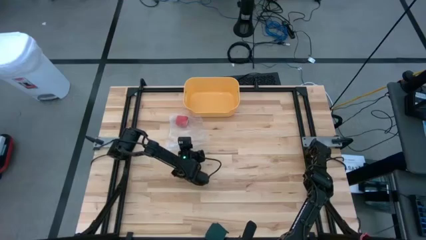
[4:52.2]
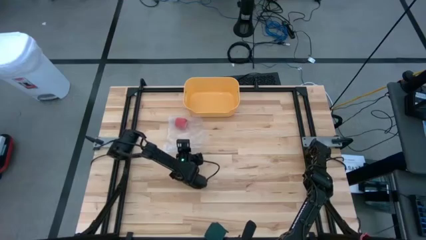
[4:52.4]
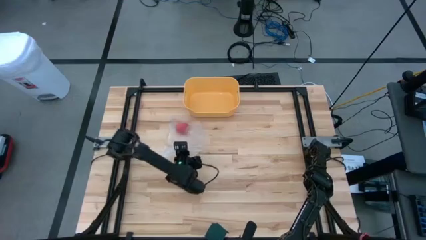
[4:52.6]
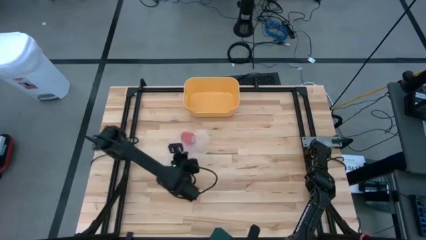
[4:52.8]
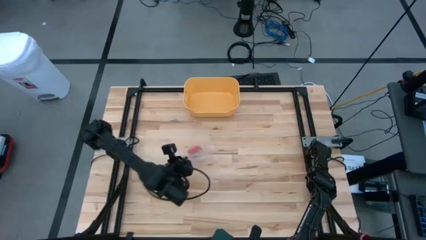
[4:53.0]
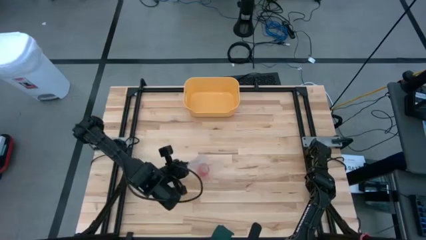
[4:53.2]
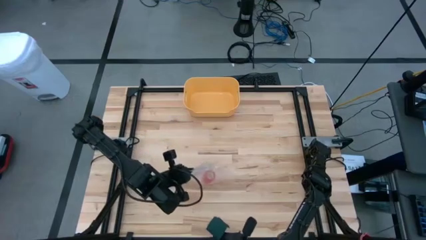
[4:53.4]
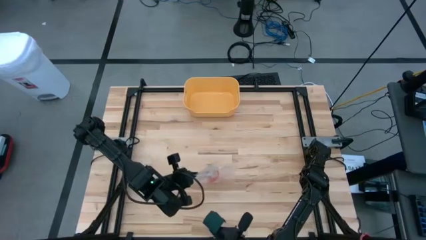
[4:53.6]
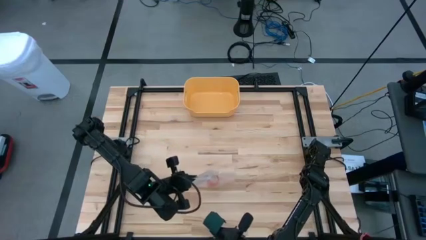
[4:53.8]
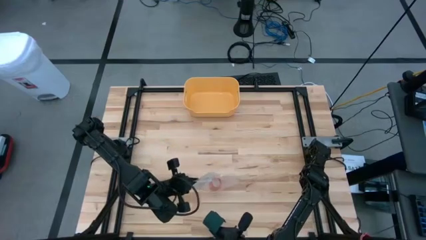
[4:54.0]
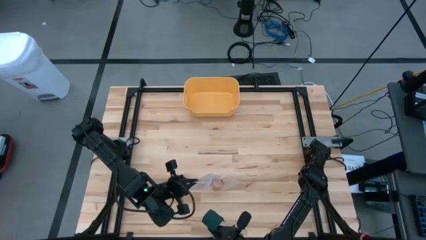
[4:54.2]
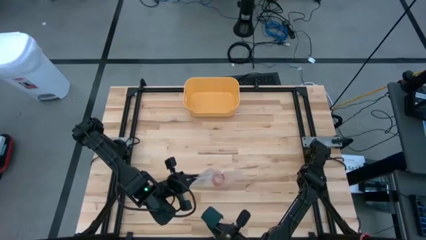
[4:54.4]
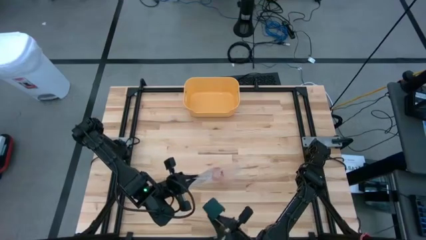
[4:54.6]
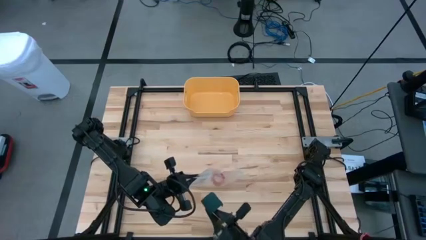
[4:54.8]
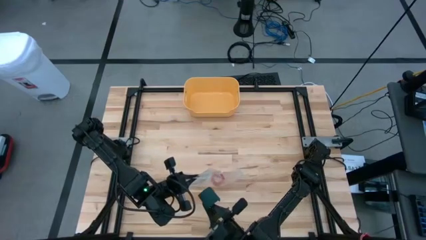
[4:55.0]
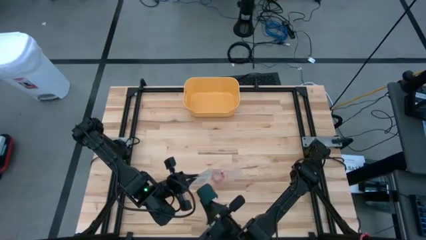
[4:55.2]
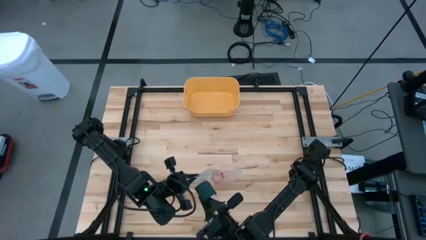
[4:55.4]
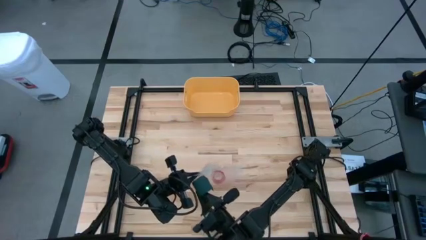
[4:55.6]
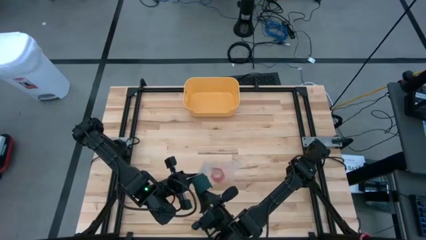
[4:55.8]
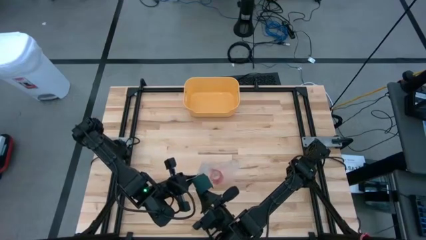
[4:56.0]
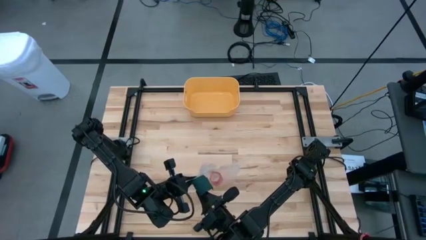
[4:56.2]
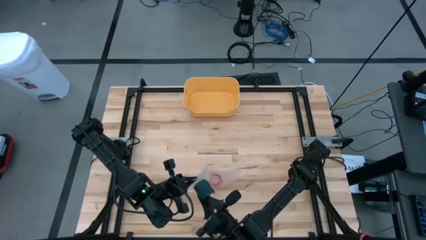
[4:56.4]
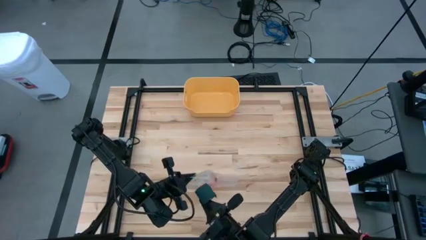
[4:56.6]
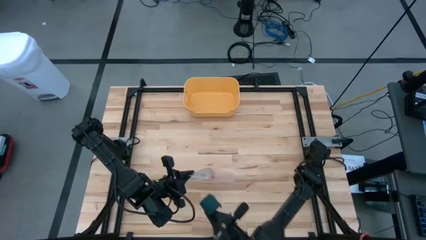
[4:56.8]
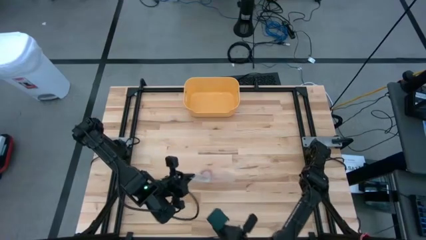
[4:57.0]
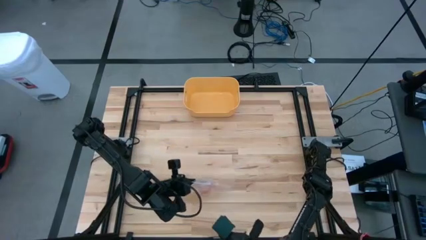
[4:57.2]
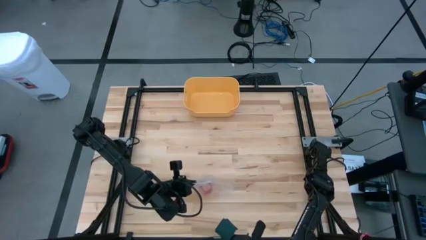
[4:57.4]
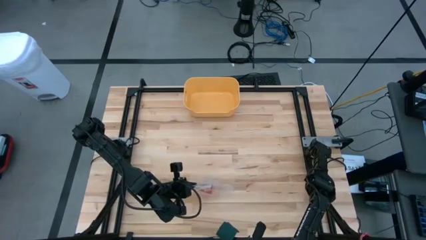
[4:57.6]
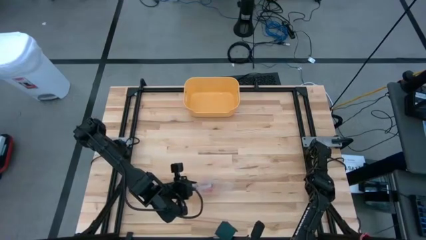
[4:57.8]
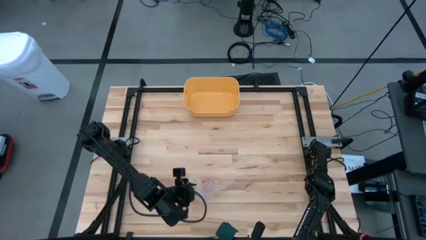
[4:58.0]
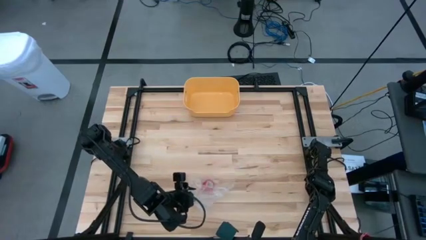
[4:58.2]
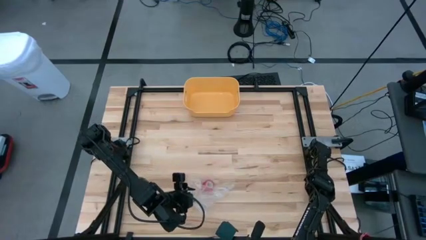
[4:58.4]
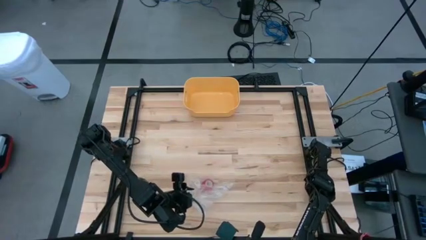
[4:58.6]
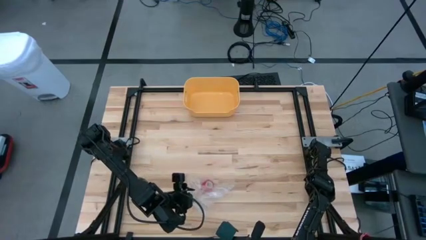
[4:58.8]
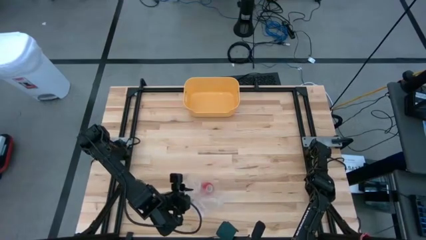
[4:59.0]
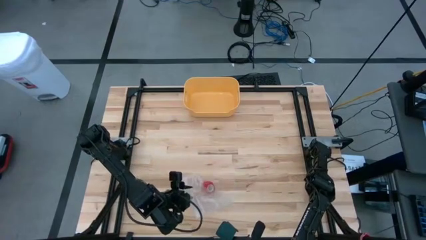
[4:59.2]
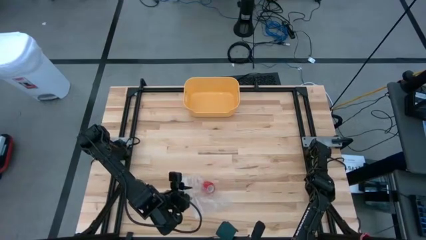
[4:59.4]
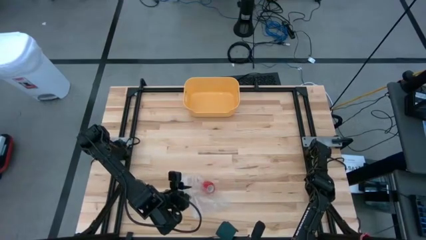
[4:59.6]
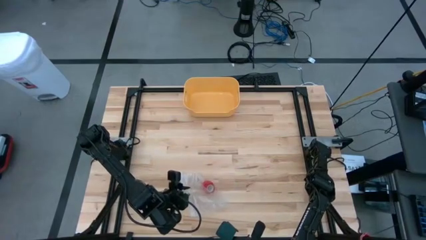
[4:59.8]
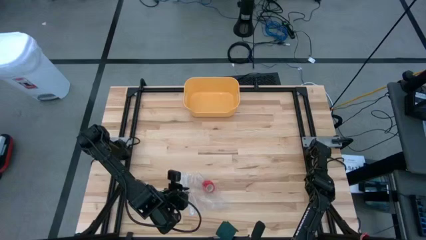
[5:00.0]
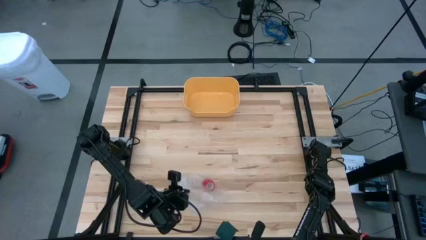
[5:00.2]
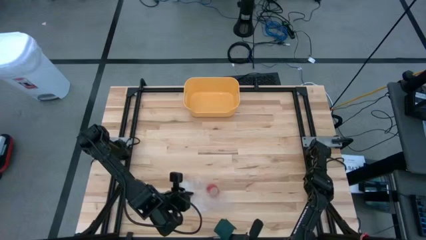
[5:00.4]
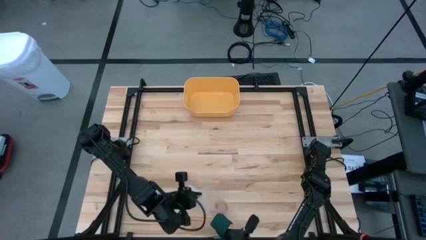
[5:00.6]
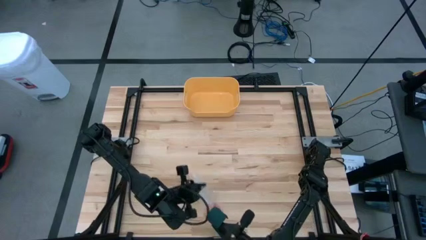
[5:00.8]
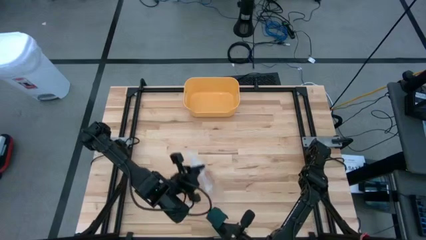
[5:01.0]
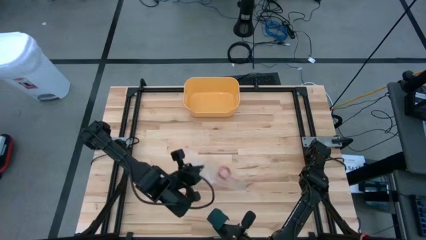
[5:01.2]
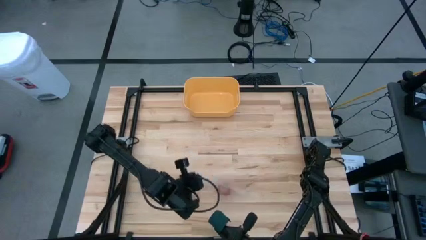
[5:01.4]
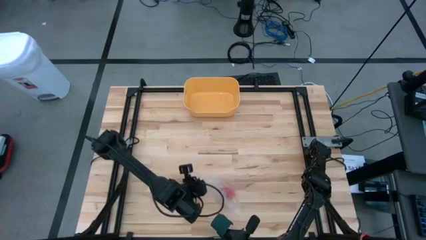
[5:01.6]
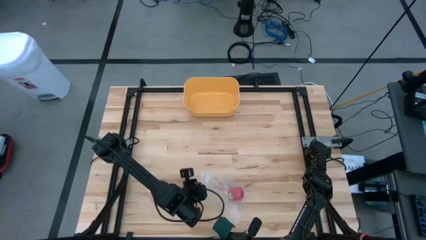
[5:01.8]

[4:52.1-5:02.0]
Task: Roll bandage
Put the rolled green bandage into the transparent zip bag

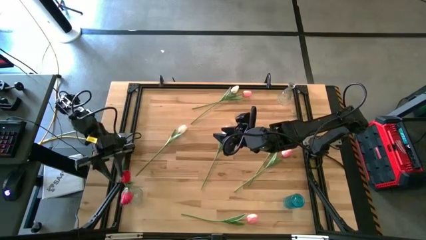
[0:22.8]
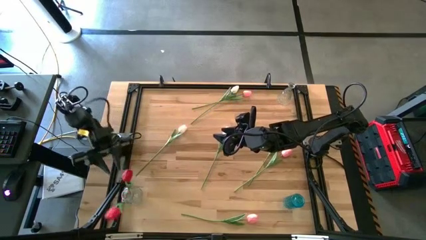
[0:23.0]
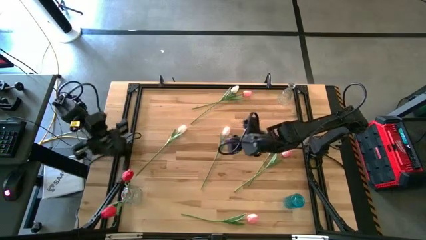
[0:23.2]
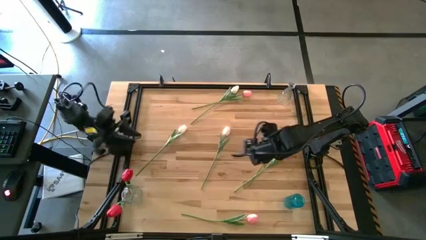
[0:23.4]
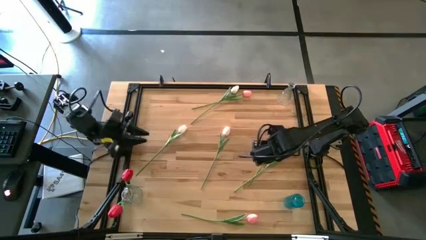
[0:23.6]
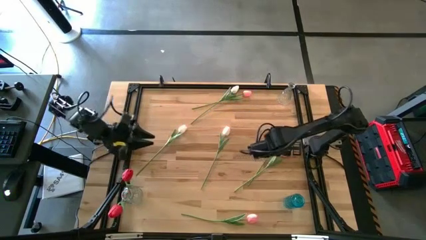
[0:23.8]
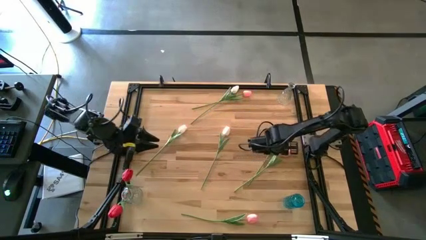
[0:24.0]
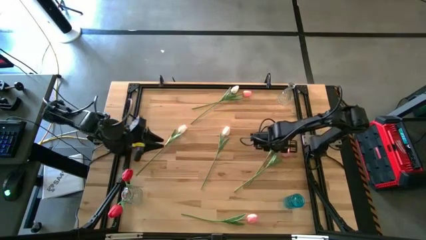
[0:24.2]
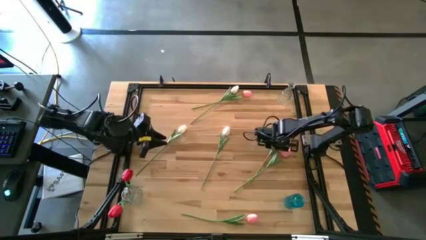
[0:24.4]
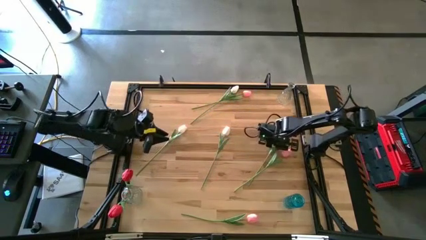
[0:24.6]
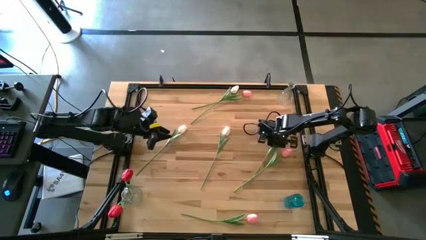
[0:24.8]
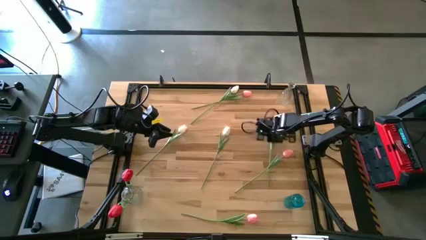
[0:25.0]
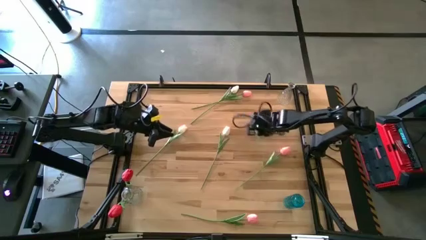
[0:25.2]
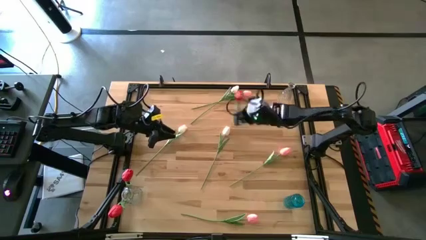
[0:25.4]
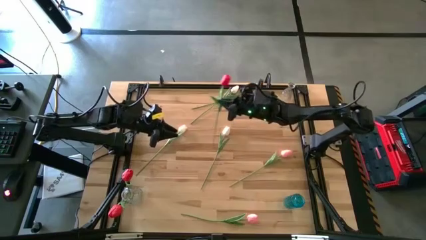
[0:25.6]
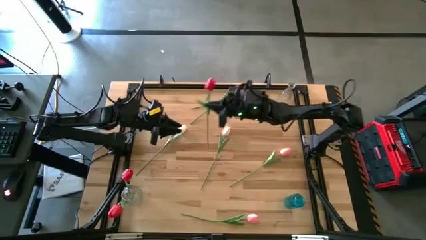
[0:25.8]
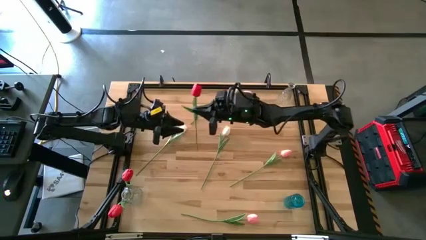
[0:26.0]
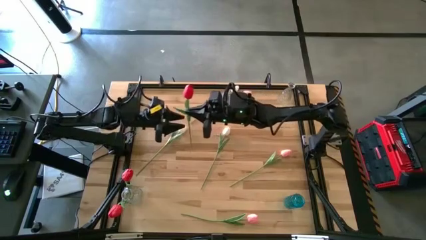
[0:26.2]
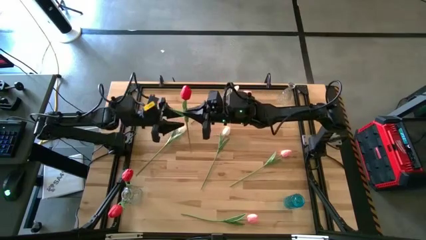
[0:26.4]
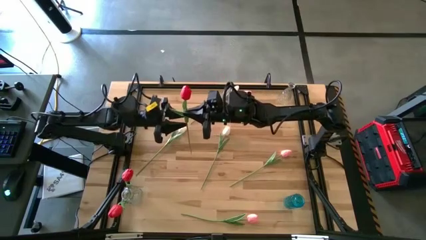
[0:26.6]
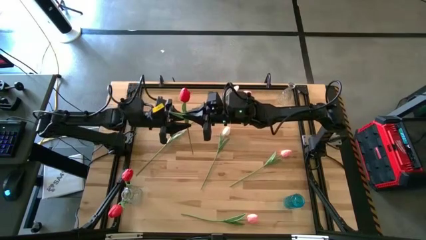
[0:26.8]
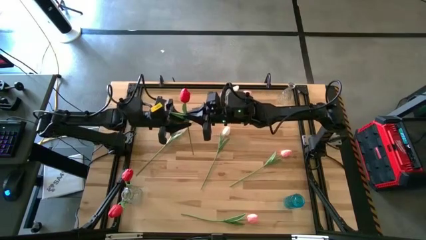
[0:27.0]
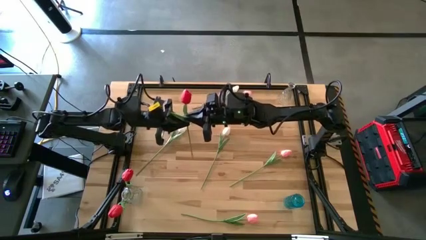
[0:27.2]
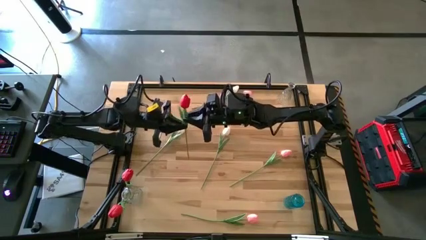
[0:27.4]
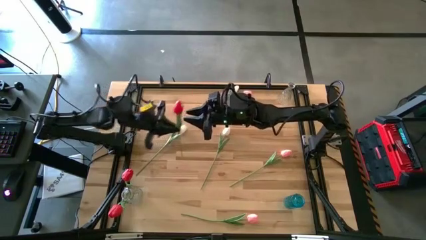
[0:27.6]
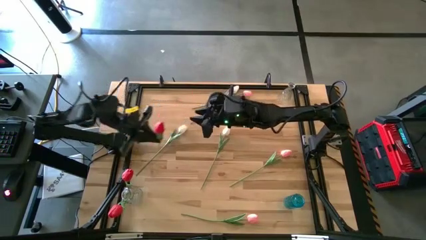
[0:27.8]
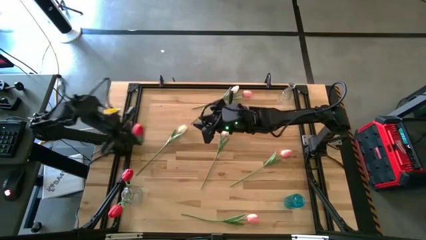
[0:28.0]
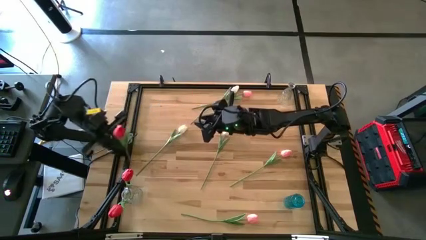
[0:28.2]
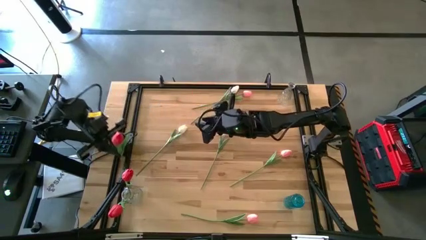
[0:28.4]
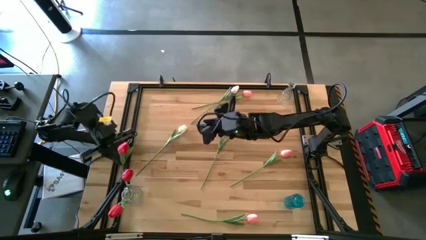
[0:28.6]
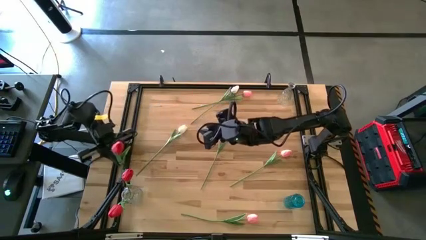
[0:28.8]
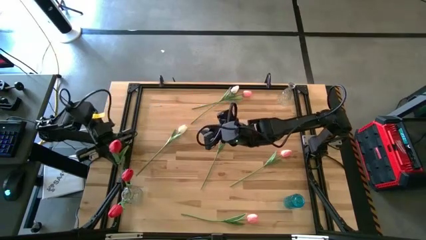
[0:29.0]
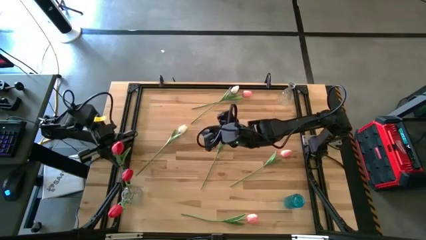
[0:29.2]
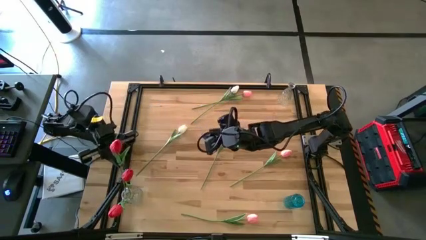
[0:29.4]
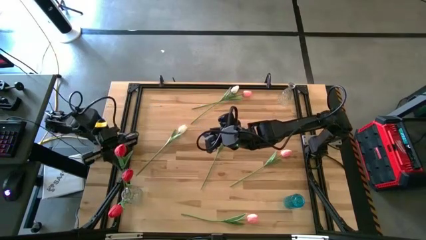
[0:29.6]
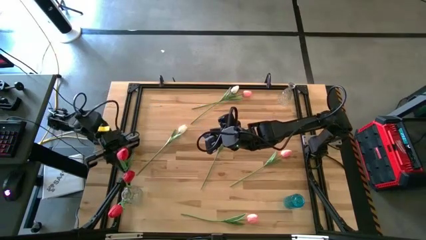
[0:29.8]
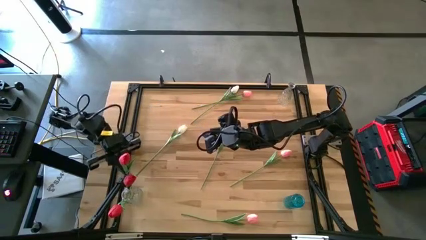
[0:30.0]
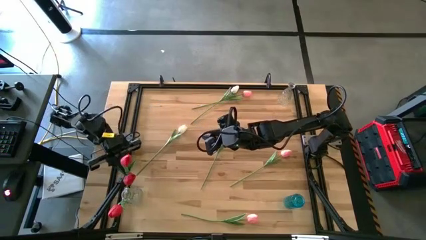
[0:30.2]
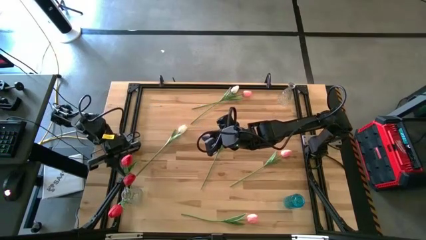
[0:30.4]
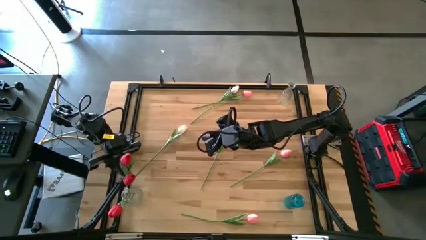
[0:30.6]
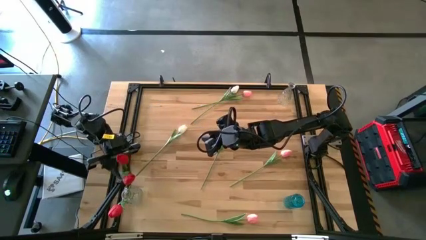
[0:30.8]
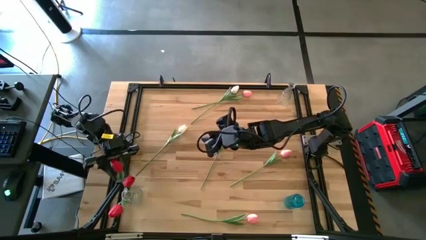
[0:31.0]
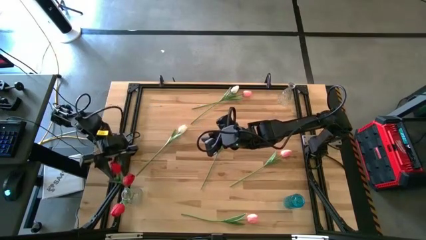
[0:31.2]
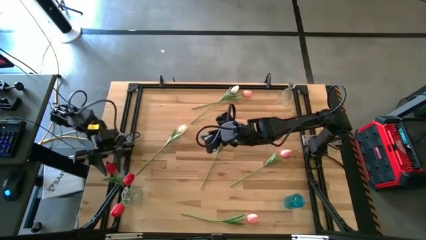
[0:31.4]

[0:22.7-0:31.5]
Task: Sort flowers into vase by color
Put the red tulip into the bottom transparent vase
